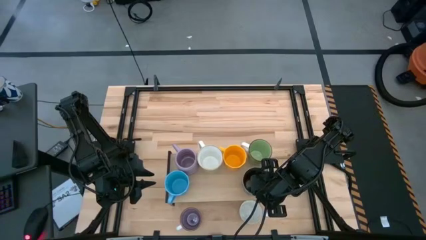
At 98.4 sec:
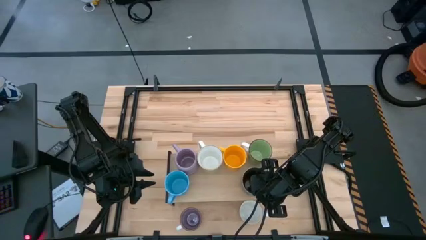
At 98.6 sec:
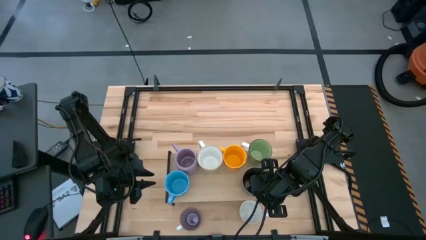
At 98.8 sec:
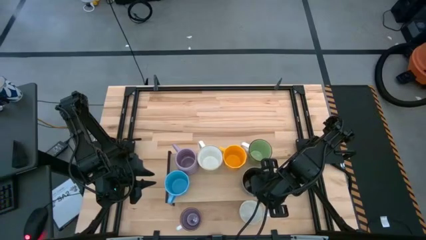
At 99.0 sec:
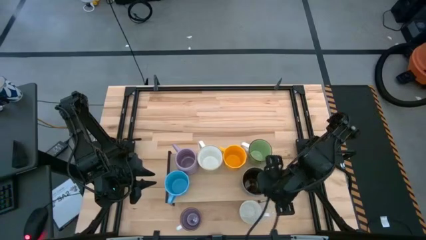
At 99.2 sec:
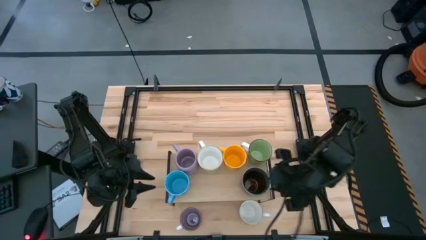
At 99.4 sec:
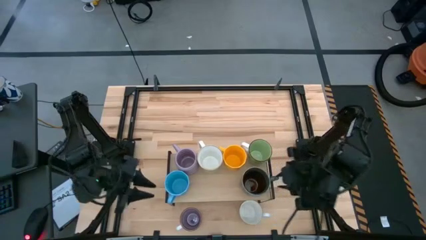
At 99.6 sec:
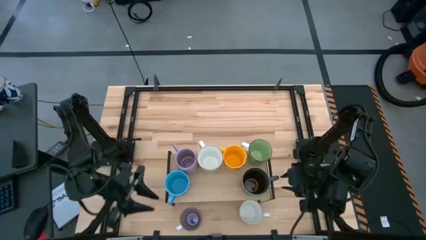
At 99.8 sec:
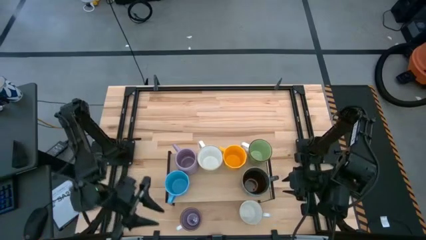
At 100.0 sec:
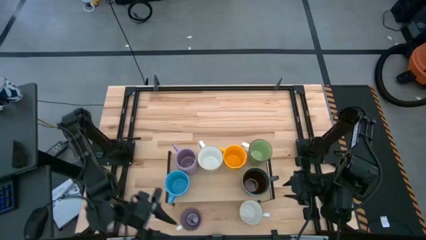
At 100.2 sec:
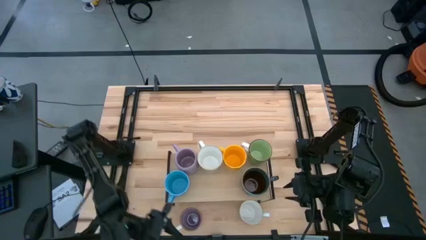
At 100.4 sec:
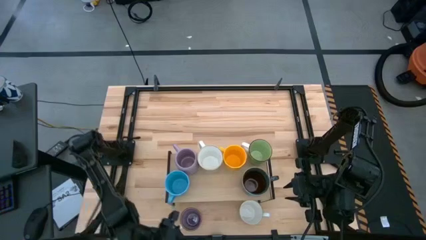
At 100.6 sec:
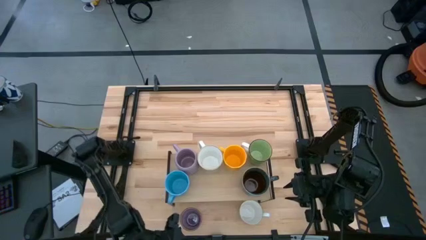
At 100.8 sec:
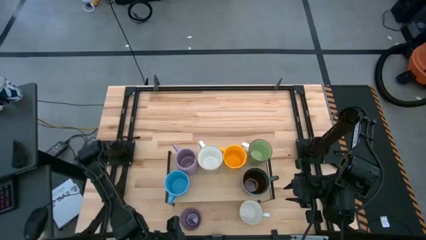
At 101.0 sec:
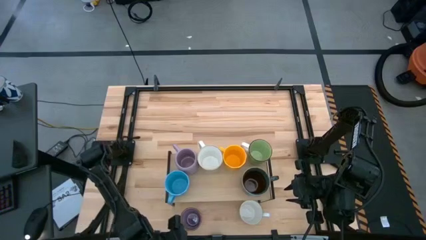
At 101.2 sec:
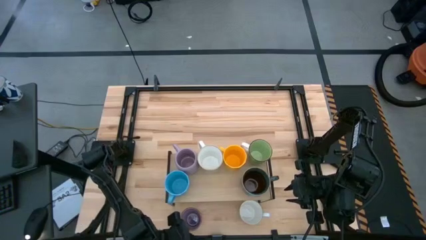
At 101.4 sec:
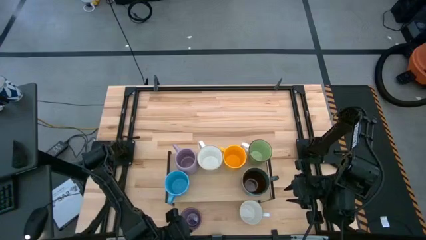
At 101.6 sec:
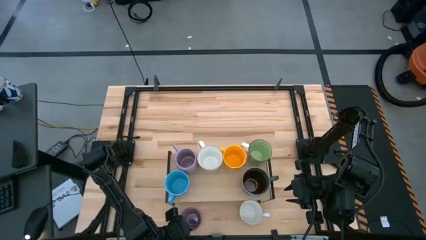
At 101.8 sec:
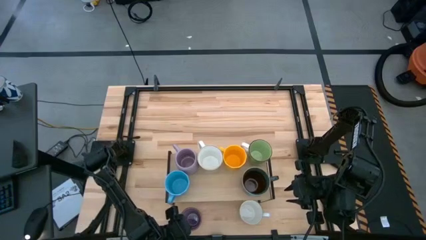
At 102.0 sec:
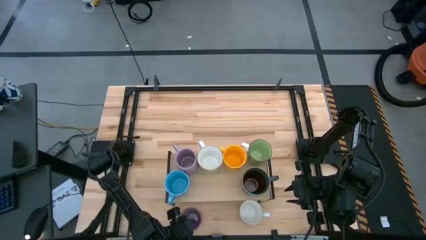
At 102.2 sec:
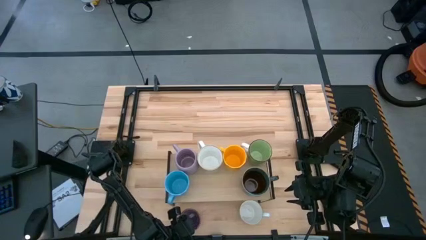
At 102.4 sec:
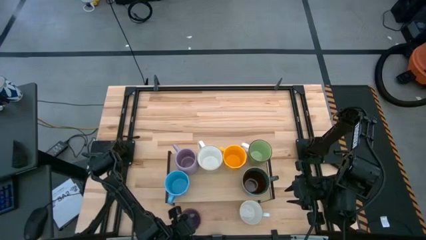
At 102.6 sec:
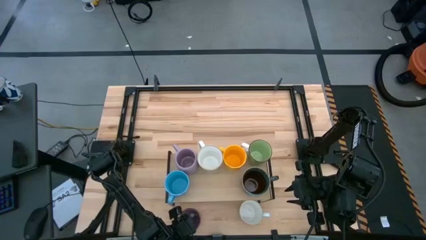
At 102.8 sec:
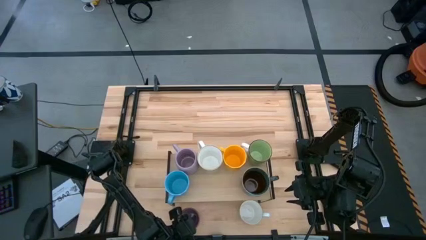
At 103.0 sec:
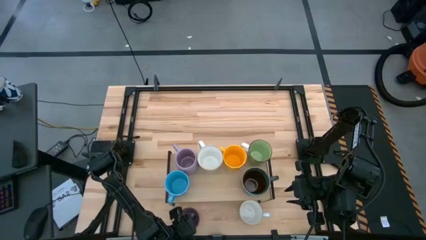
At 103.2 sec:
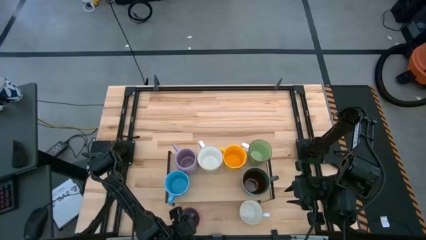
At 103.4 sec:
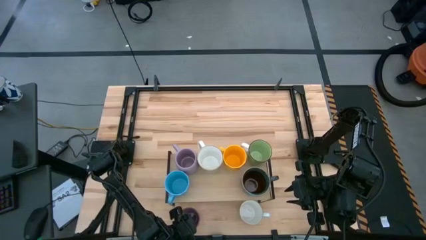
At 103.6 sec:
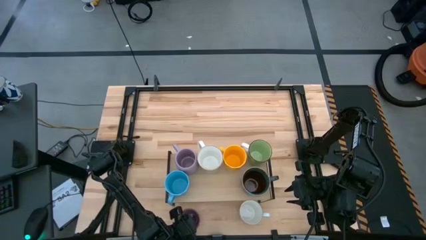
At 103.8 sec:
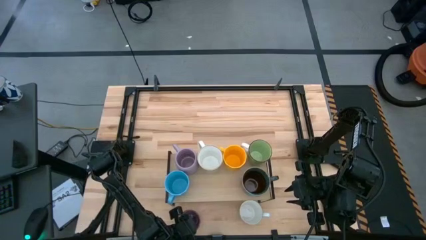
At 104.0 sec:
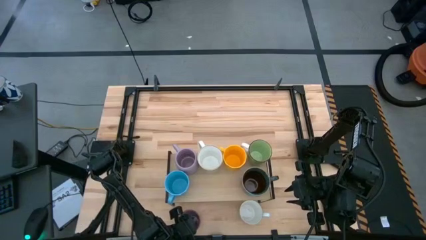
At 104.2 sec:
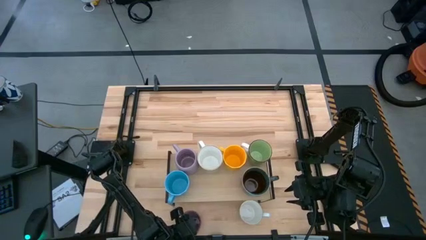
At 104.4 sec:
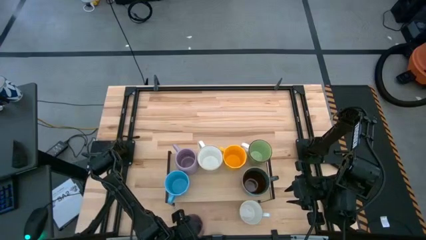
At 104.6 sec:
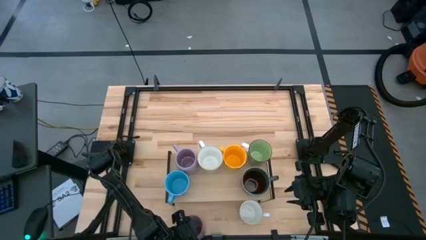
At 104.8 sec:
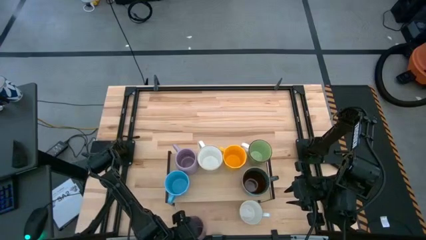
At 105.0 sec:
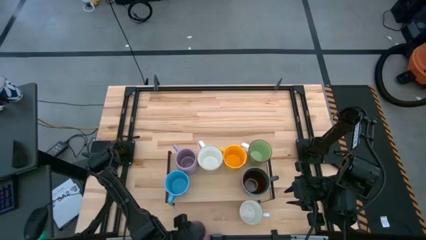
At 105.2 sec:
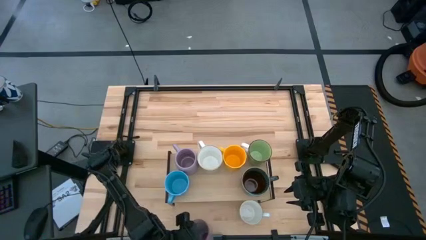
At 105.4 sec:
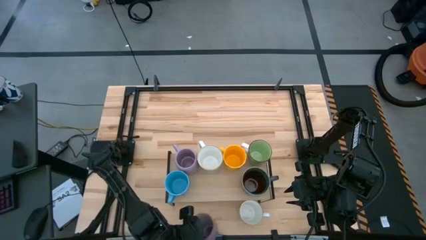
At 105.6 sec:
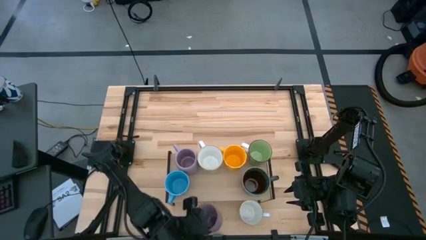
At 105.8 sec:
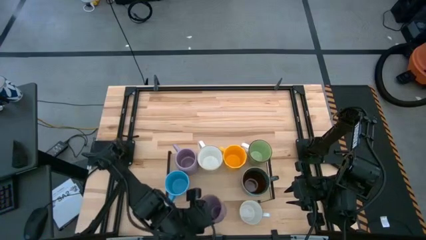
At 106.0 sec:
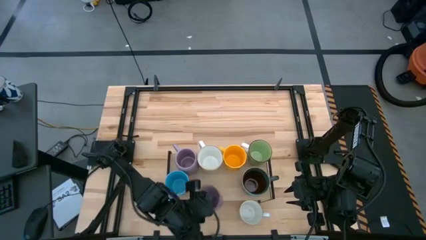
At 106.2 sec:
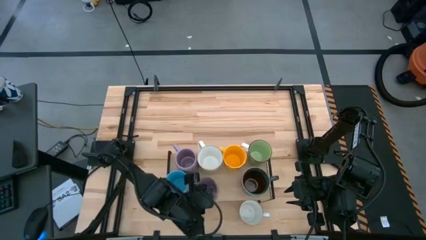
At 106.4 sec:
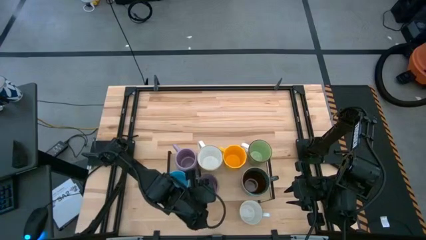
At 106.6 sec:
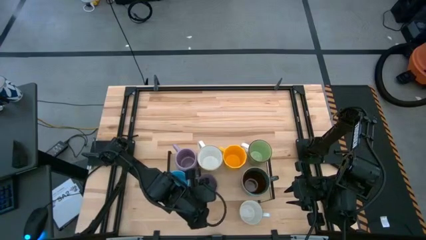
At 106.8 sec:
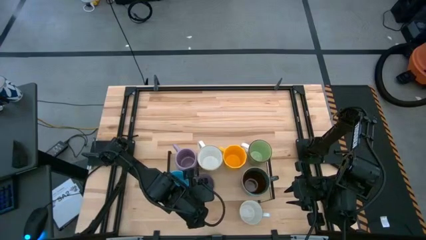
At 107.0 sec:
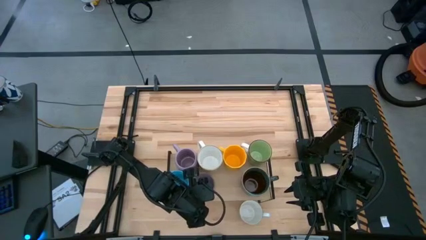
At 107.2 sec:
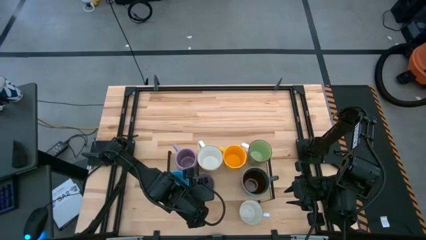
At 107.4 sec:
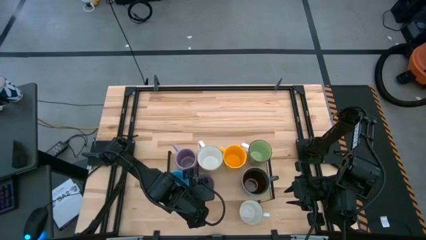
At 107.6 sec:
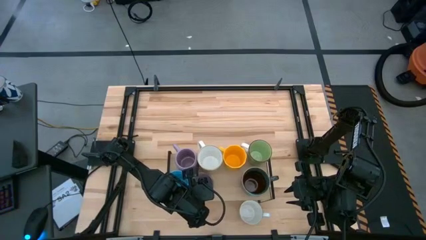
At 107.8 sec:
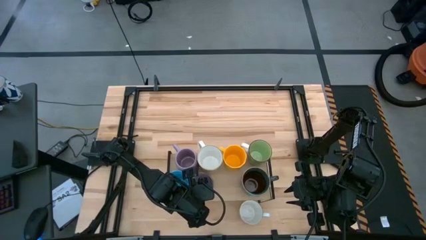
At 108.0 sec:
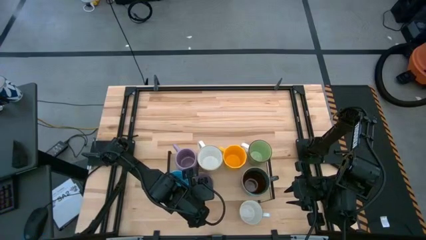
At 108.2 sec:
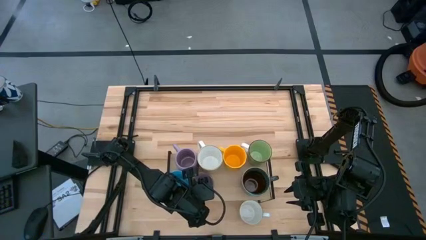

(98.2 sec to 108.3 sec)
Task: Place coffee mugs
Put the purple white mug on the shelf

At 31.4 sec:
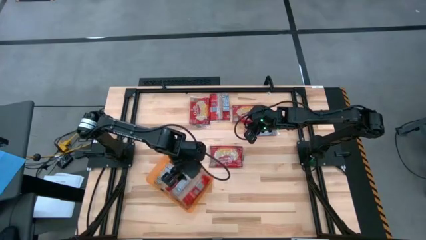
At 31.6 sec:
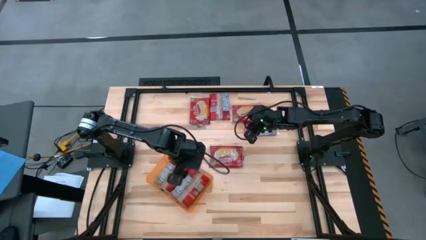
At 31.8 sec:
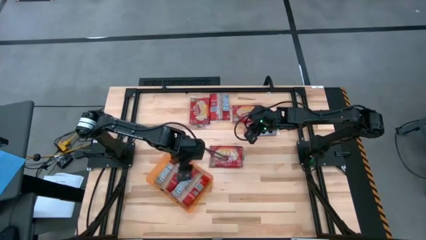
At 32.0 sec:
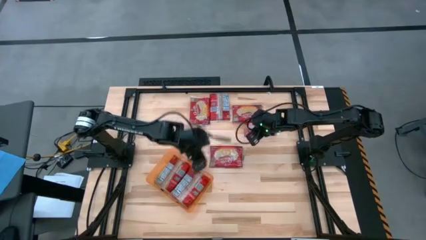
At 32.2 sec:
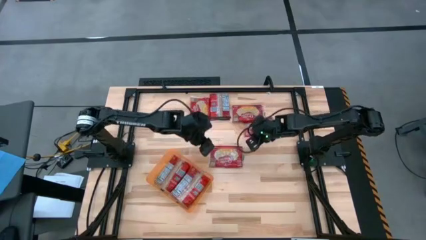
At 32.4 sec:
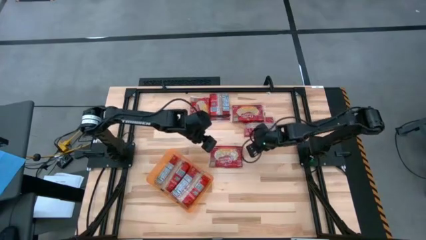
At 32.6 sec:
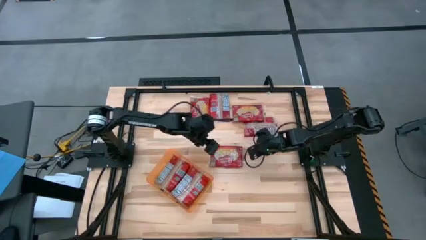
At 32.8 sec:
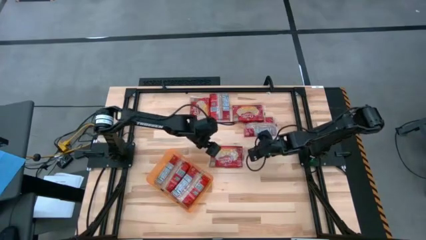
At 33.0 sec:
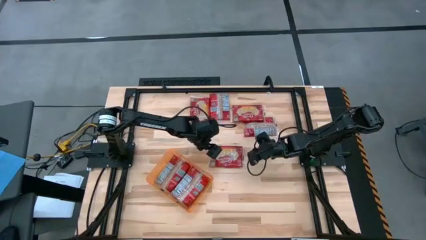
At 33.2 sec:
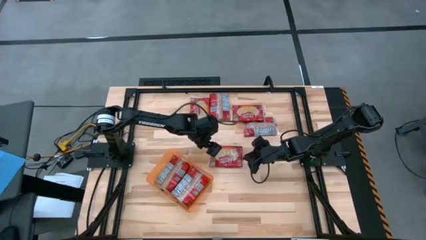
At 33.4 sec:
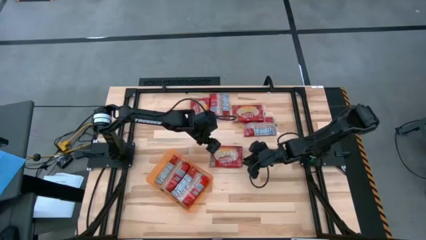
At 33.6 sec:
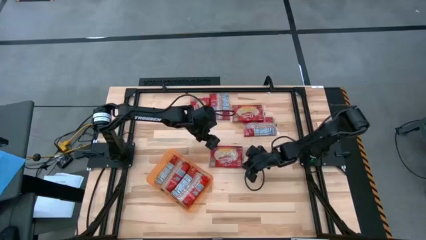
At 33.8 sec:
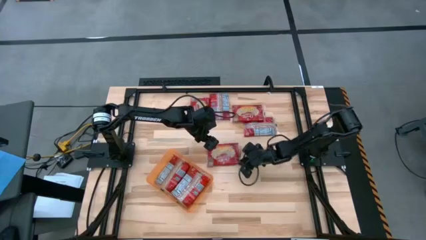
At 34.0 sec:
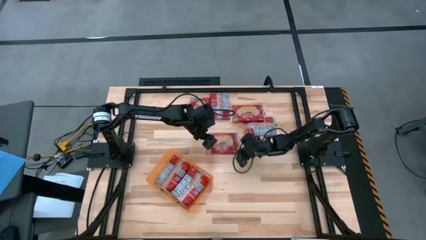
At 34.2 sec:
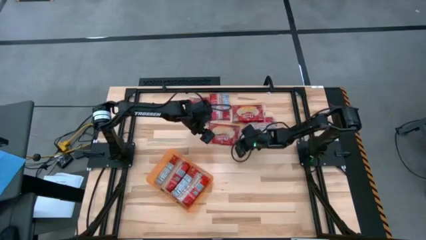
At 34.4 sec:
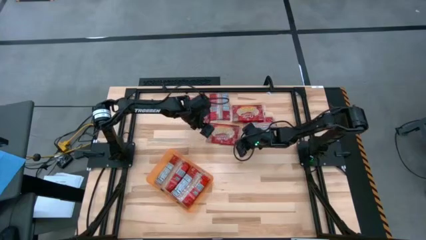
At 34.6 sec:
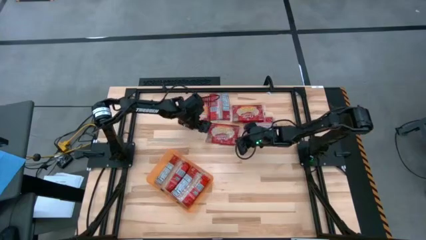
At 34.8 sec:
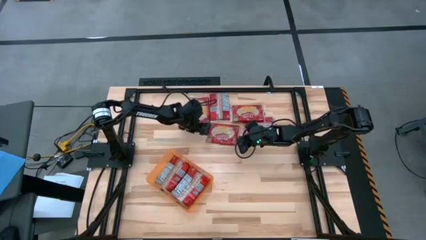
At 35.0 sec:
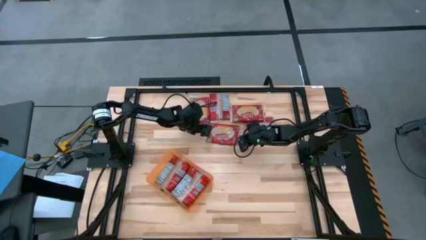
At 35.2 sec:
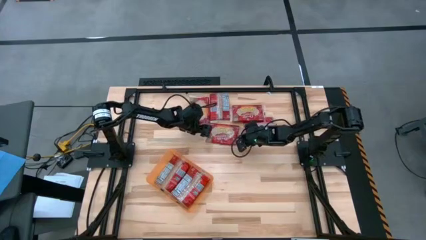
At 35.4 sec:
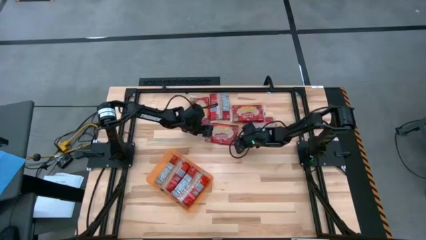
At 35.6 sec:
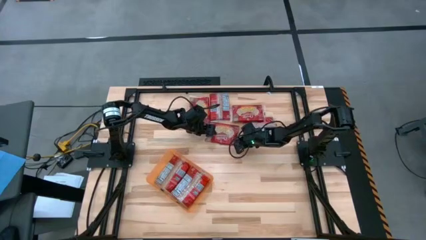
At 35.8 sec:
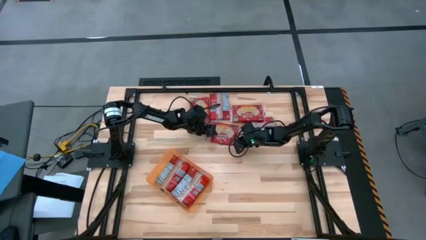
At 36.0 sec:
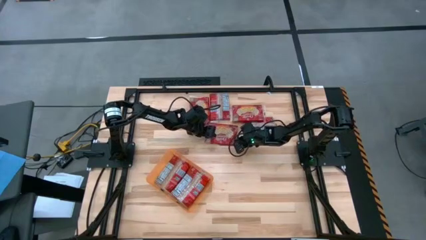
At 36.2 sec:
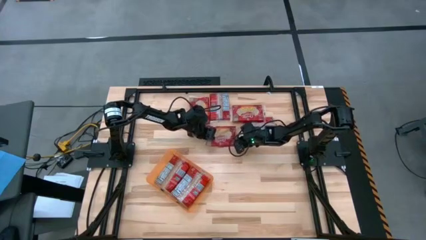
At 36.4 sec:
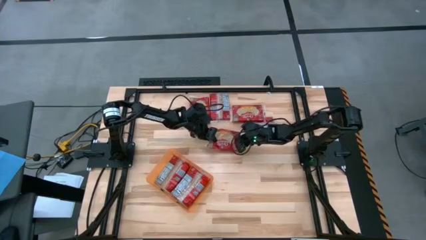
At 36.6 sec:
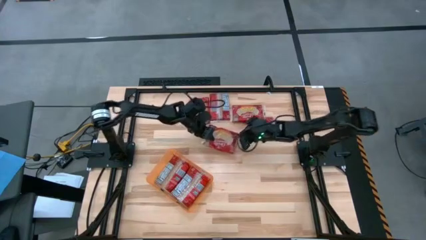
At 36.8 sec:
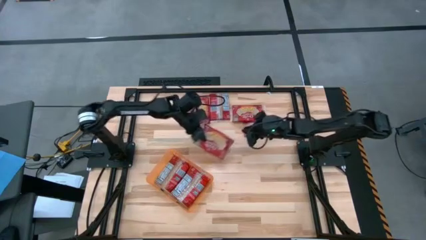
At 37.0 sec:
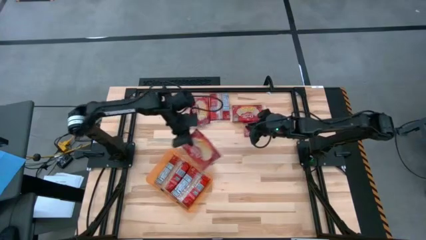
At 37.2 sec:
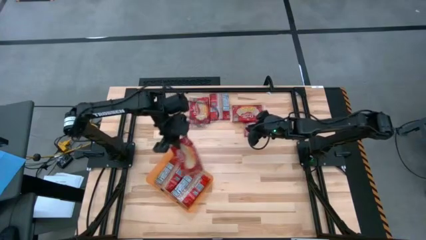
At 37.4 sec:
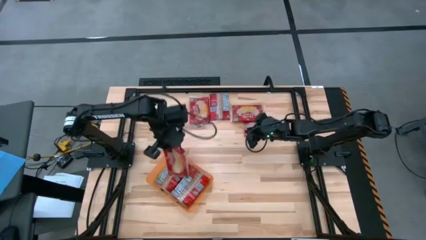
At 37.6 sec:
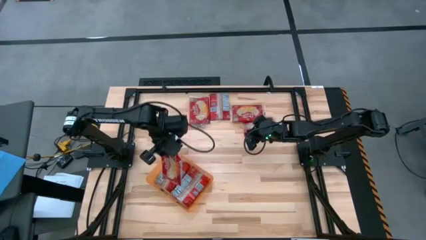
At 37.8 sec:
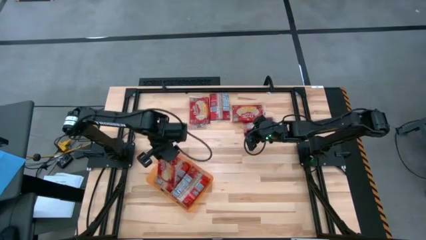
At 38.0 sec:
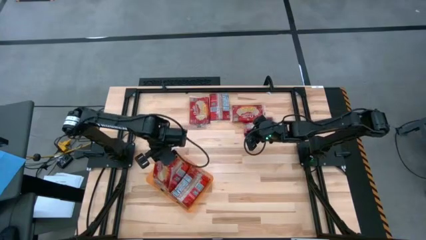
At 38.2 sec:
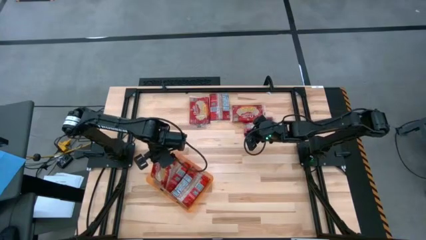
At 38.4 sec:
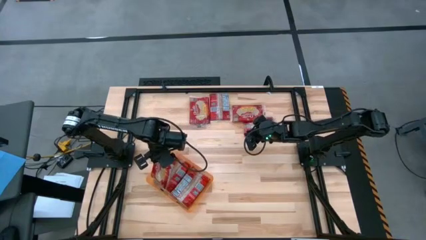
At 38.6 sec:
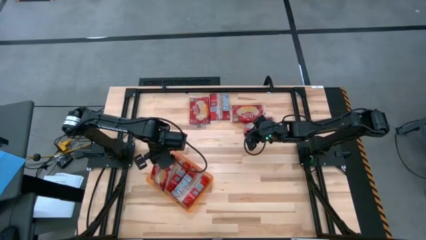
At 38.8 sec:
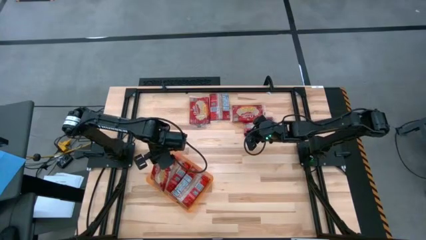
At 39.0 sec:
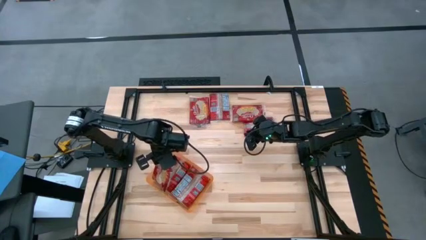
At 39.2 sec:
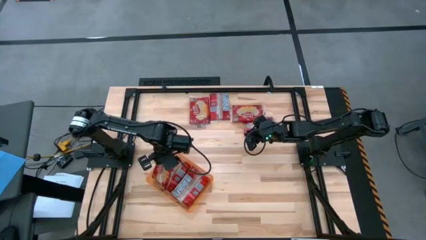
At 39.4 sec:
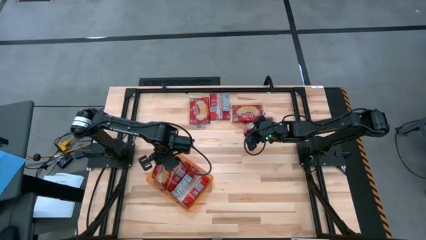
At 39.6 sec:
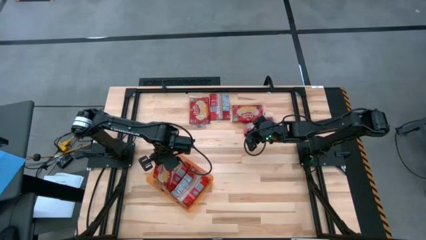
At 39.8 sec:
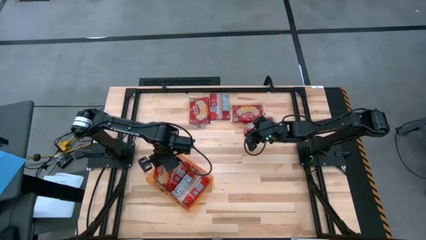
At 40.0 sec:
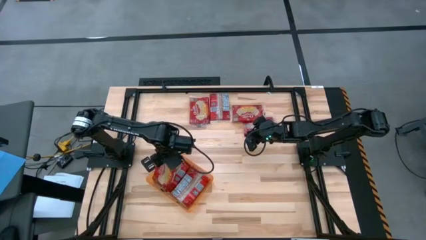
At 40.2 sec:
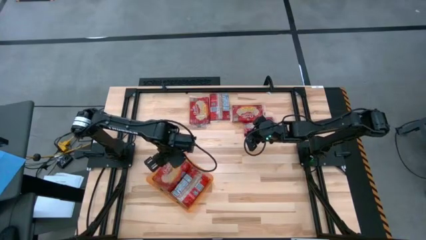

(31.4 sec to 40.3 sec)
Task: Sort popcorn bags into baskets
Put the popcorn bag into the orange bin
